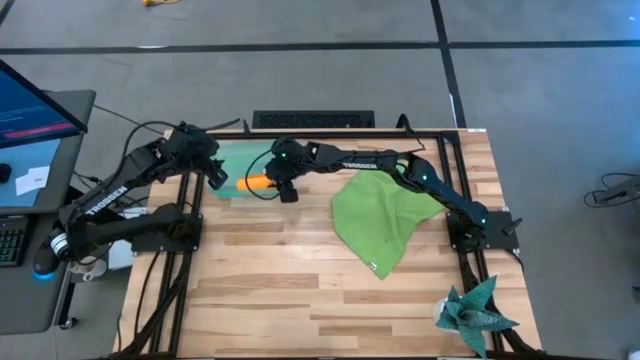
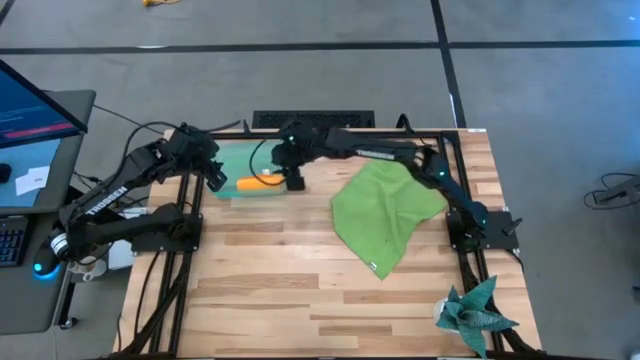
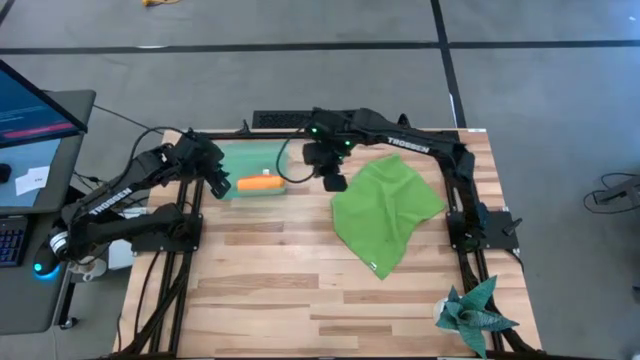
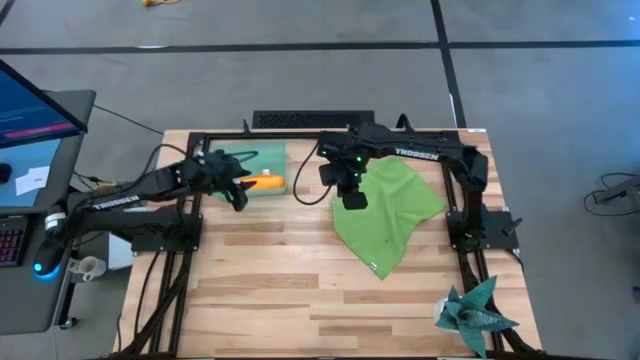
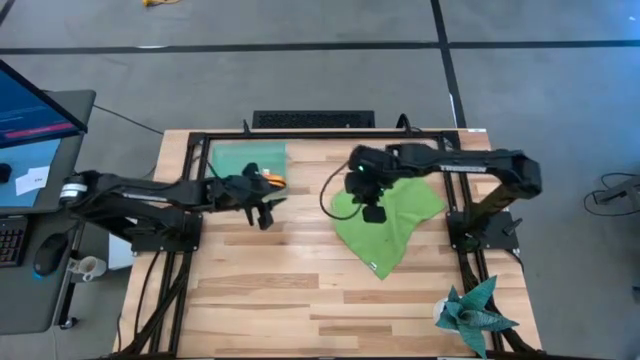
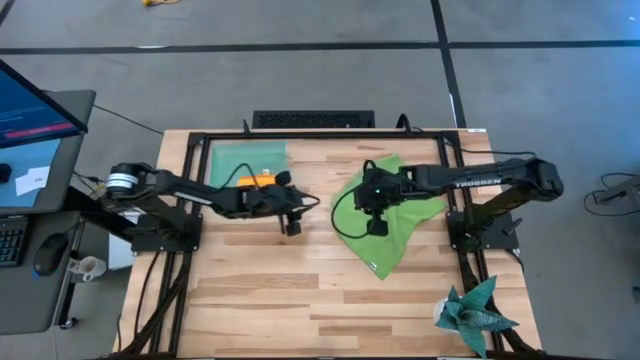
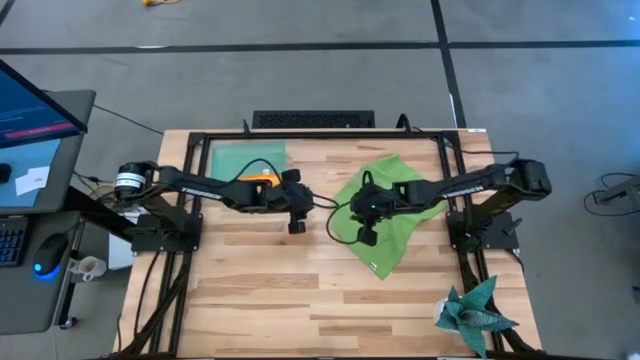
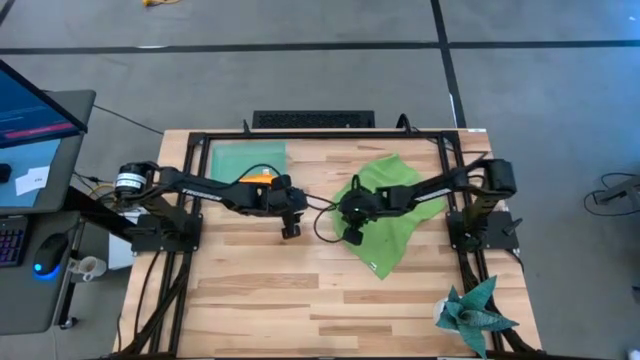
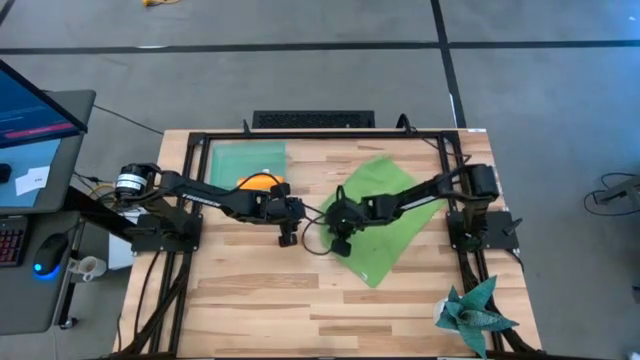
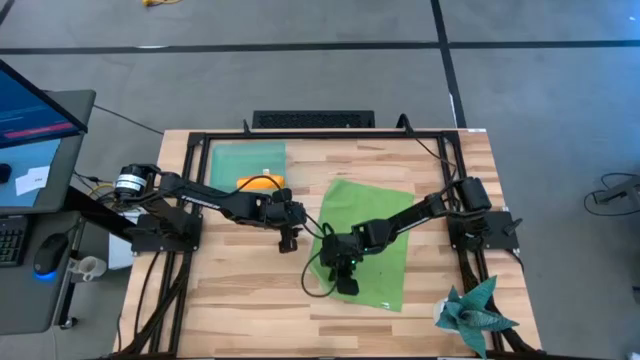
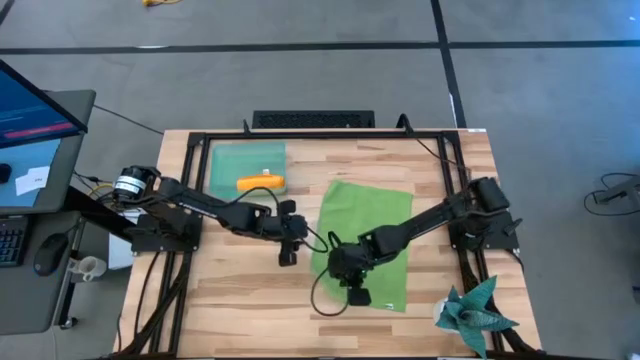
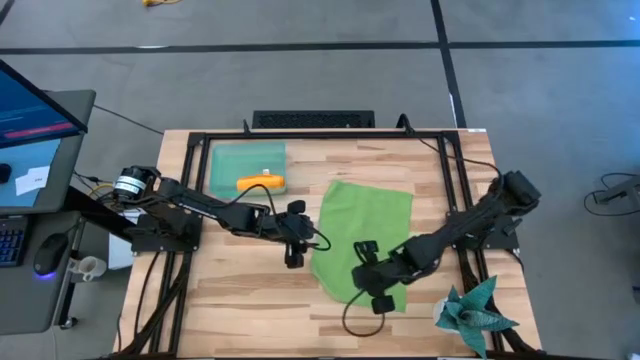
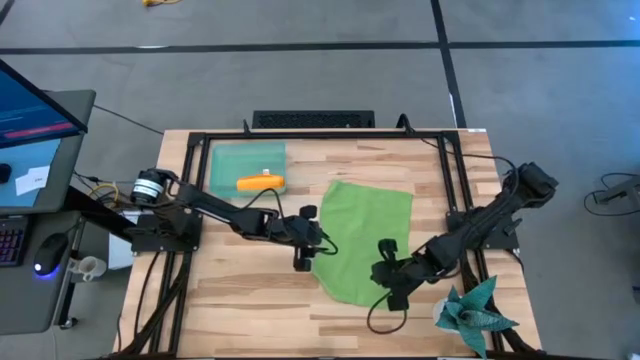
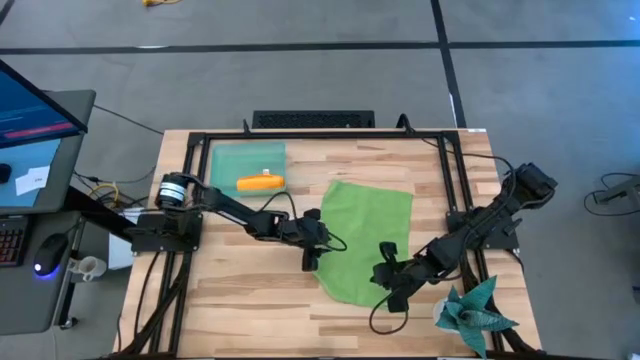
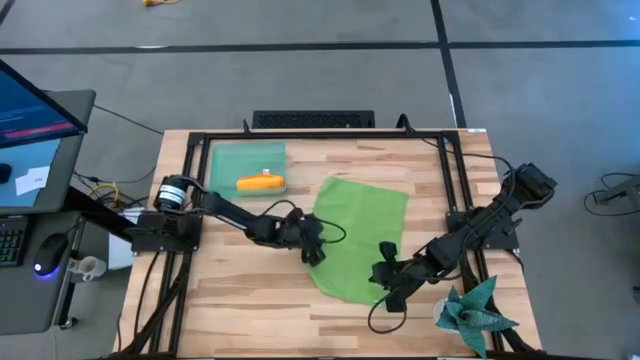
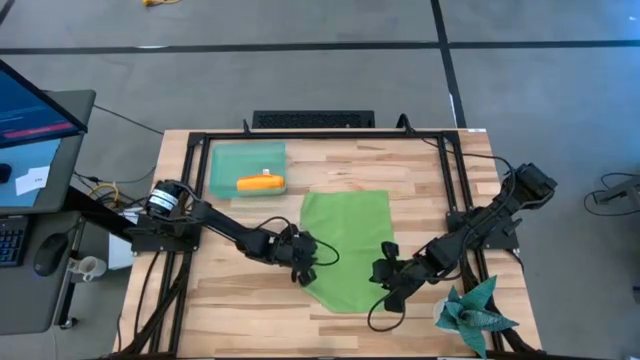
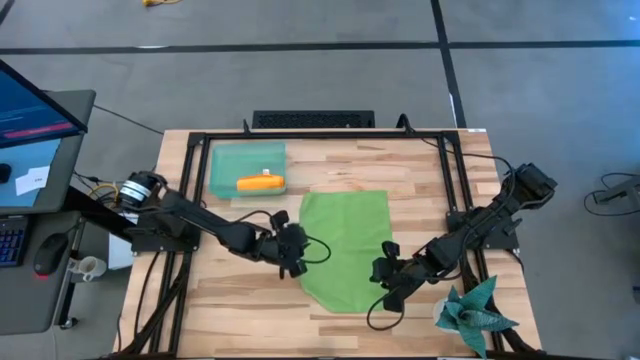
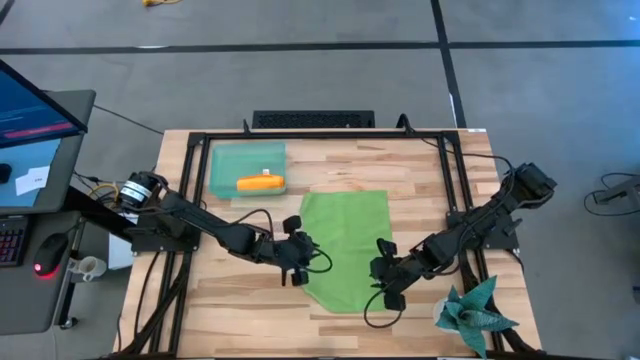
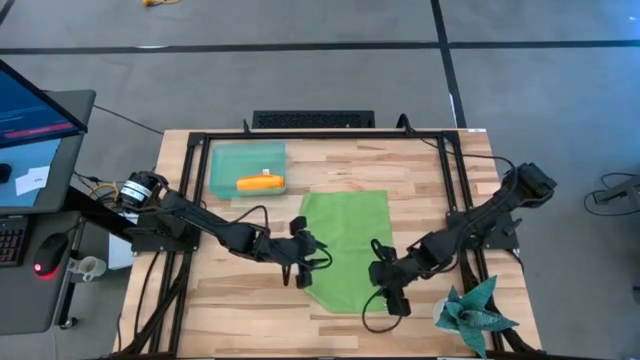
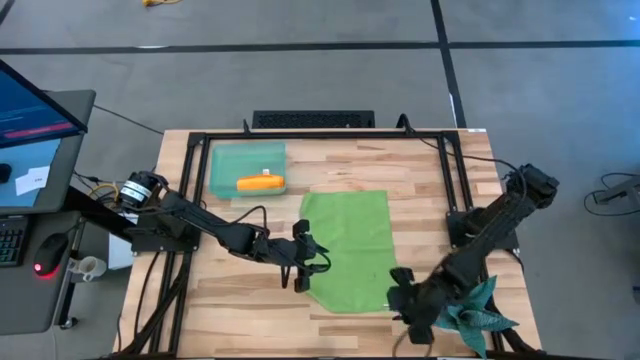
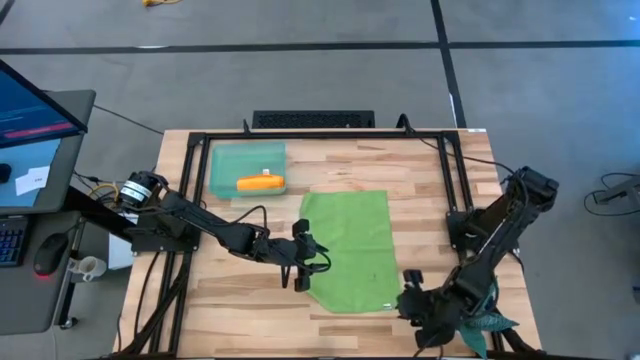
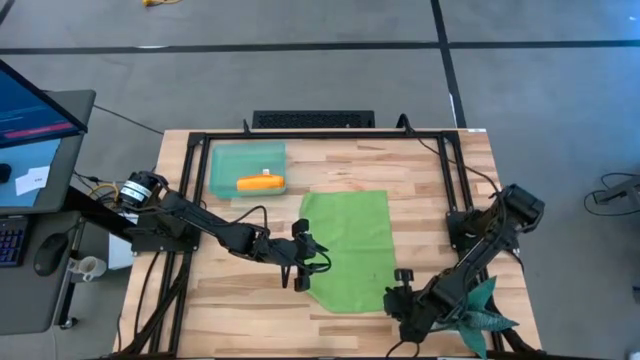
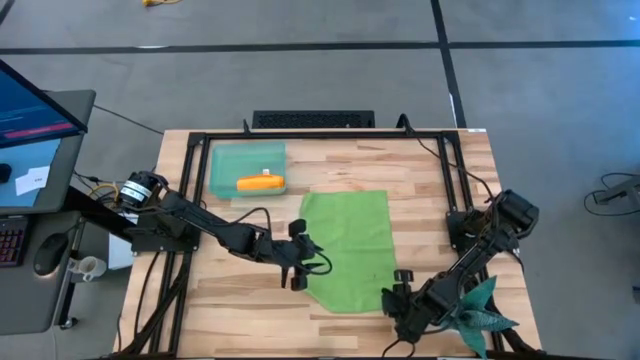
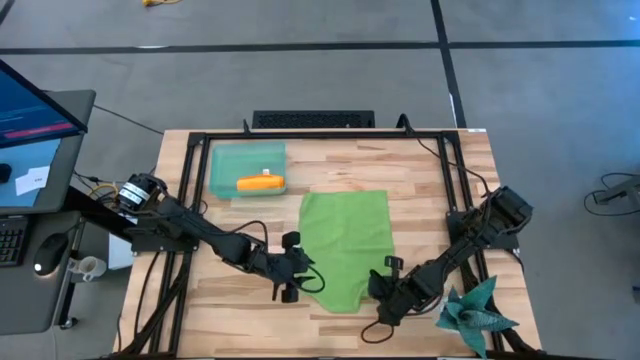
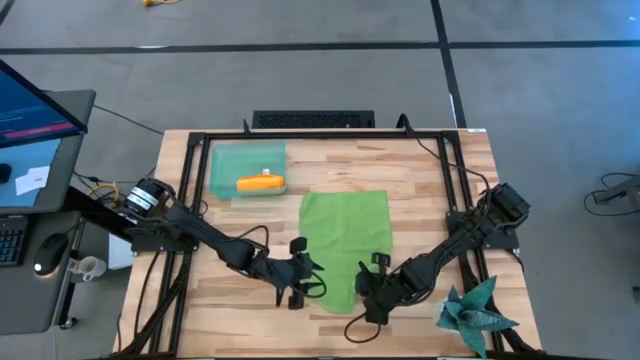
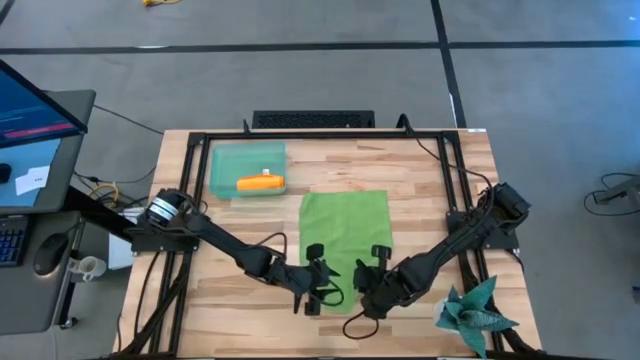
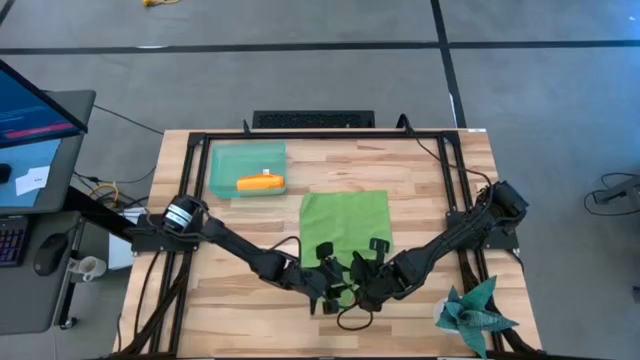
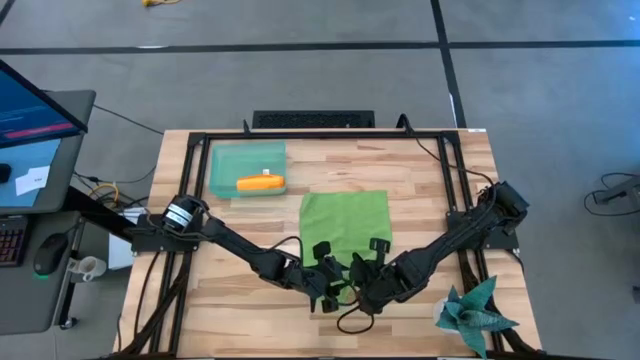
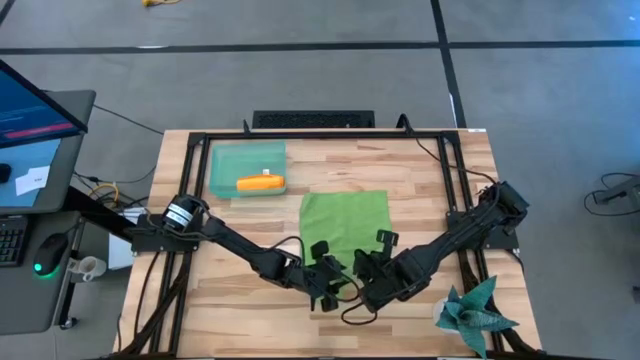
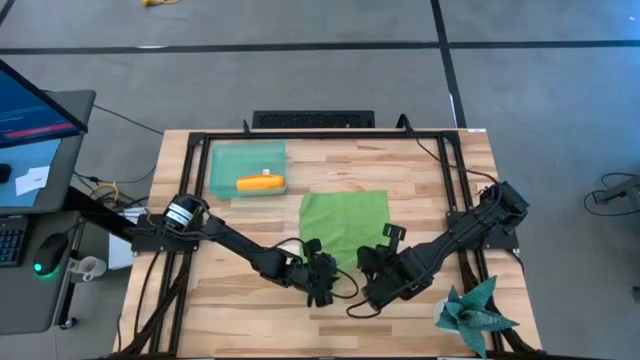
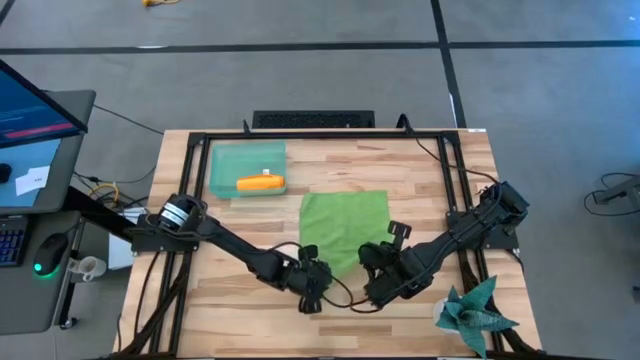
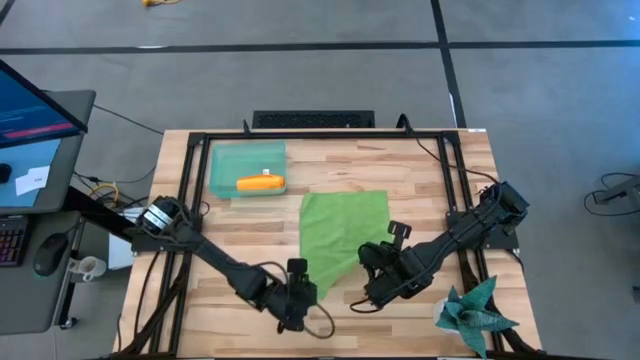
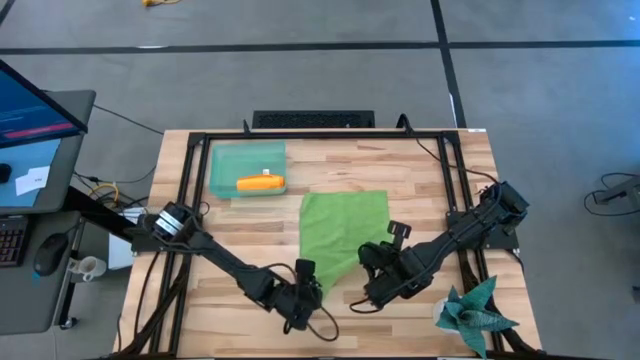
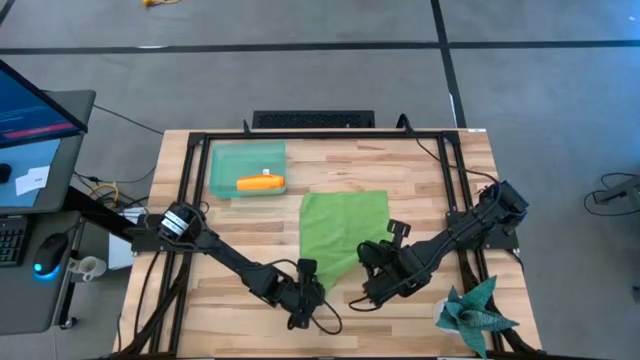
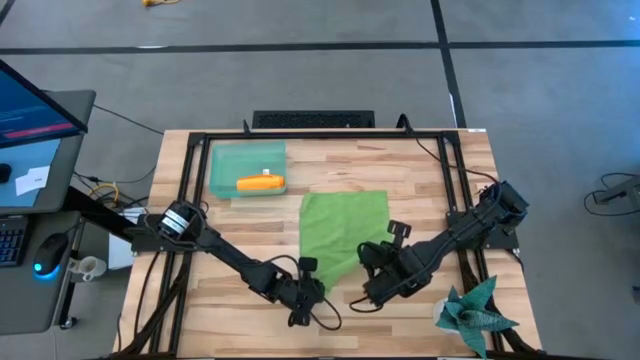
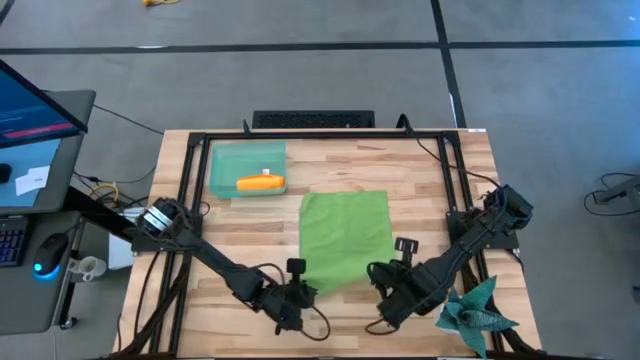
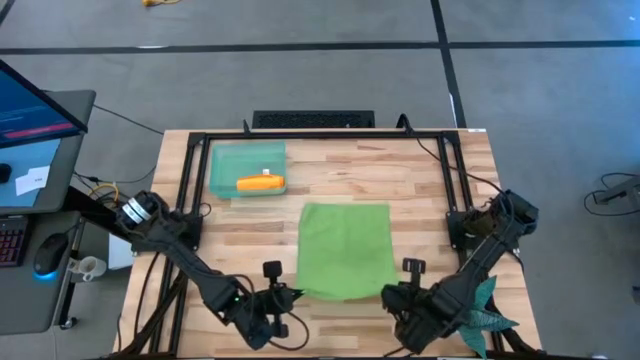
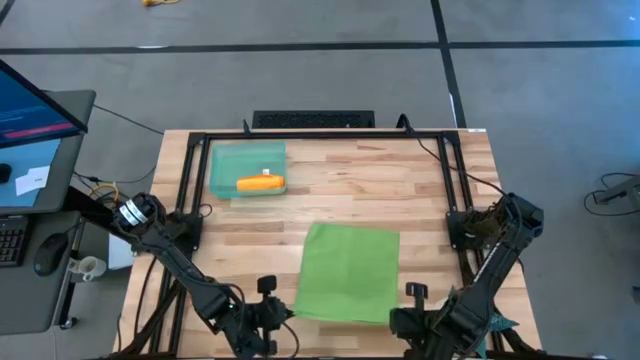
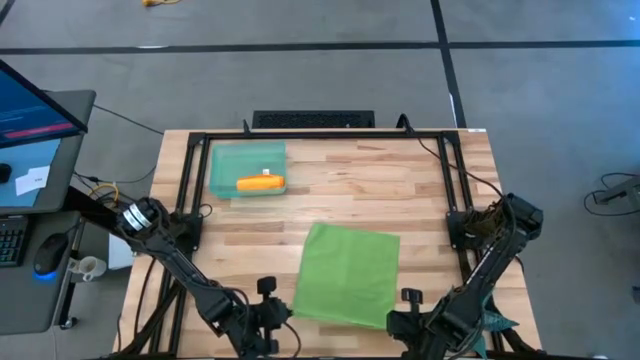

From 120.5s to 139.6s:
Task: Roll microfiber towels into tight, uniform cylinder then place into a basket
Roll the green microfiber cloth

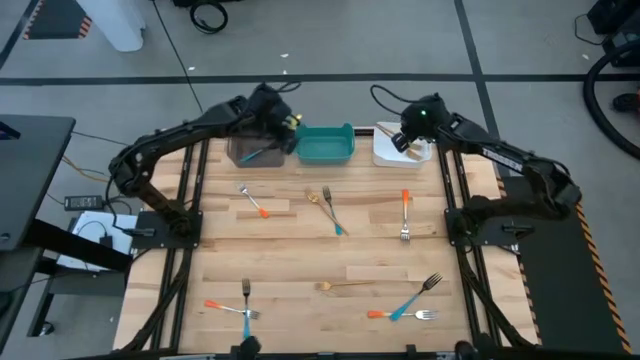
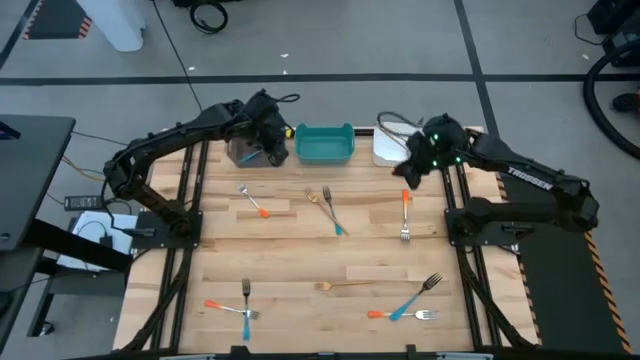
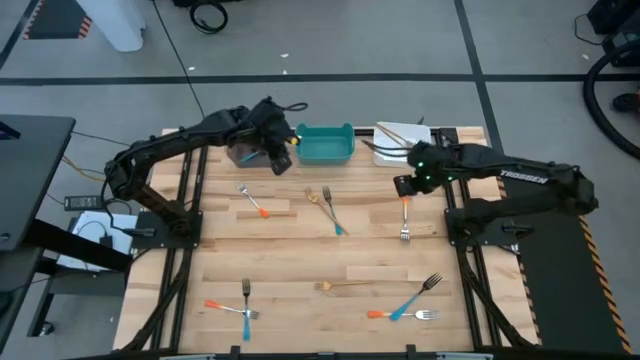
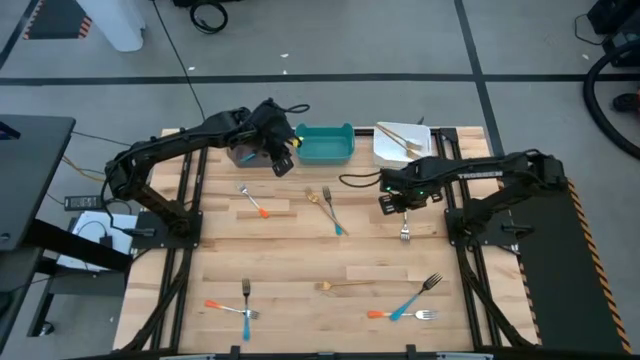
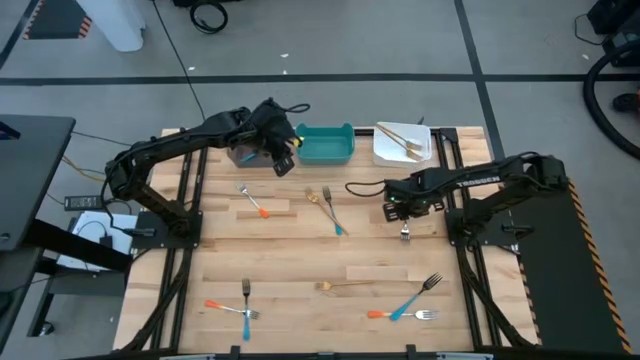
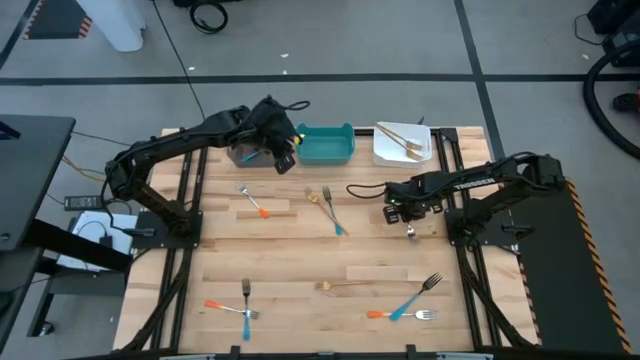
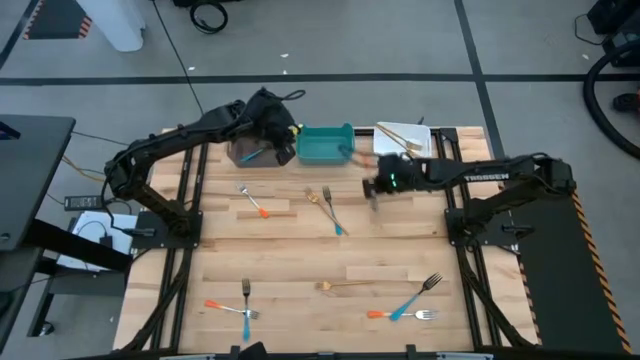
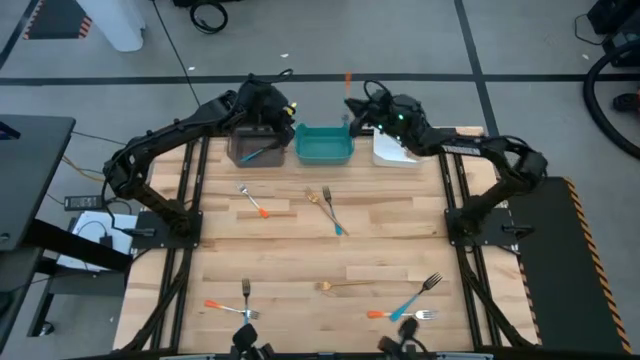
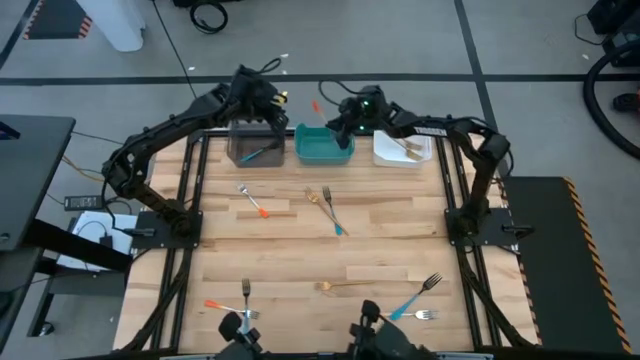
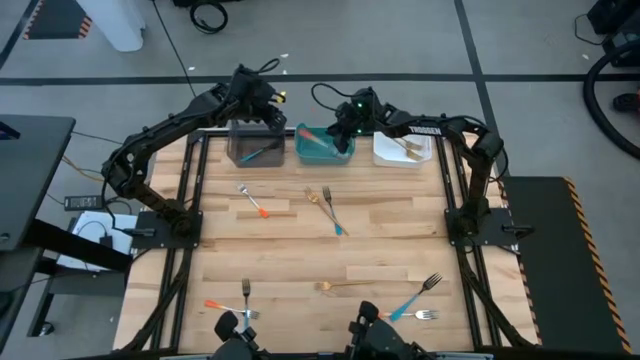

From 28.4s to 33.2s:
Task: Sort silverware by color (type)
Put the top right orange fork into the blue bin
